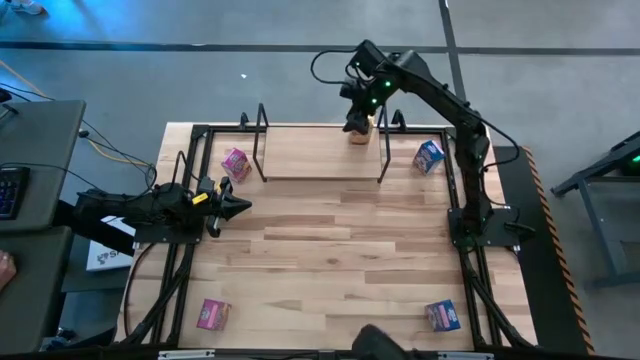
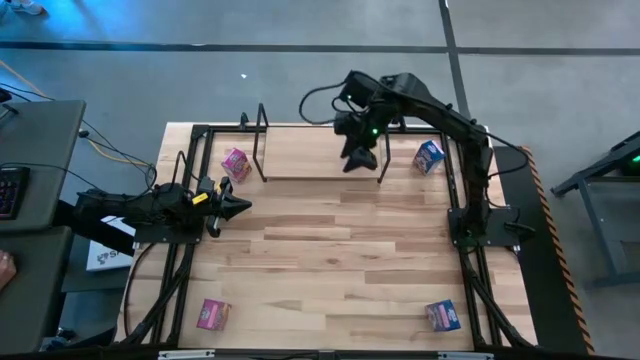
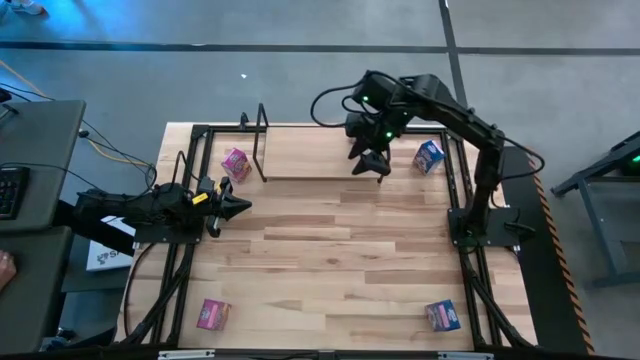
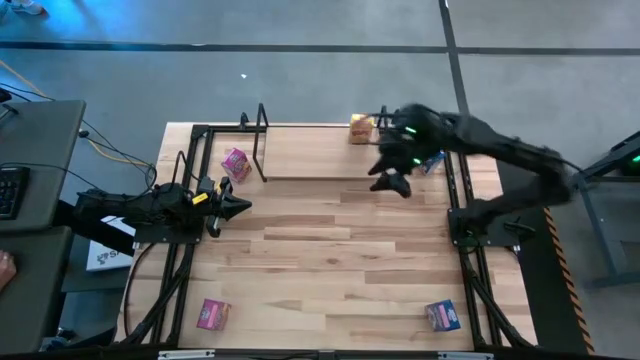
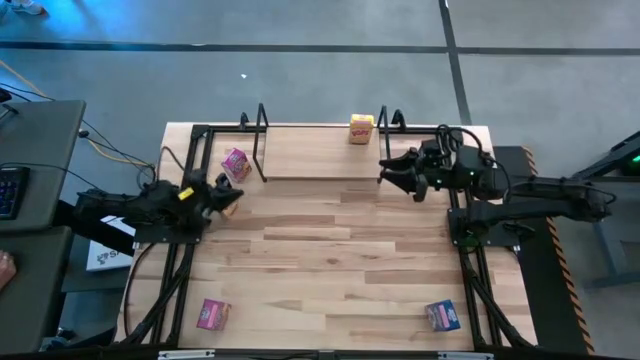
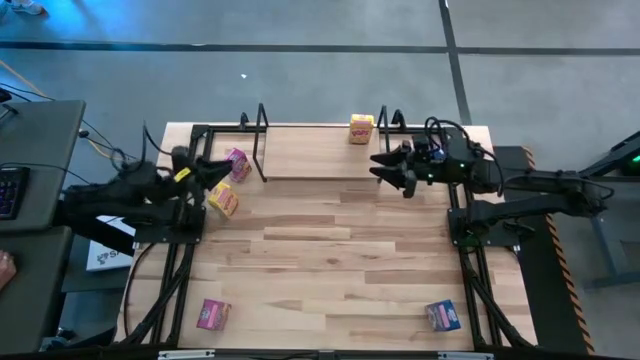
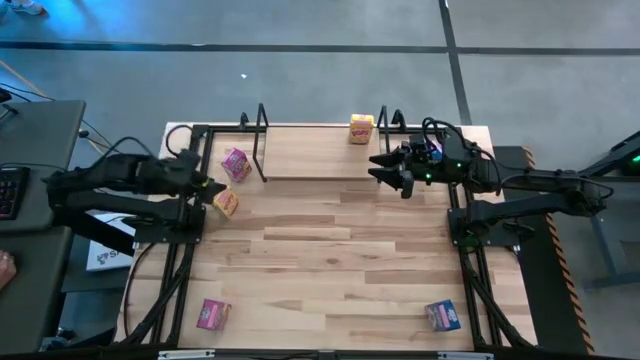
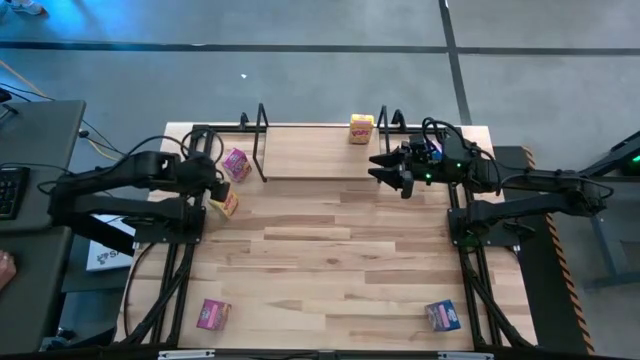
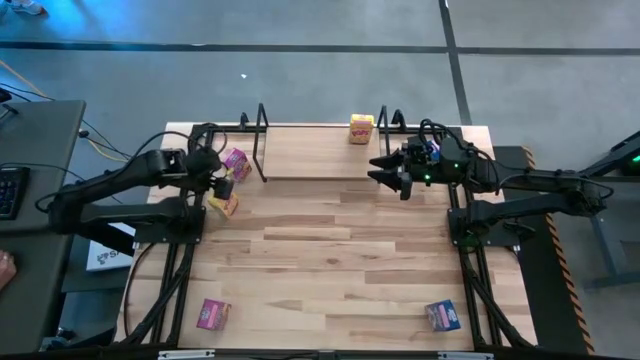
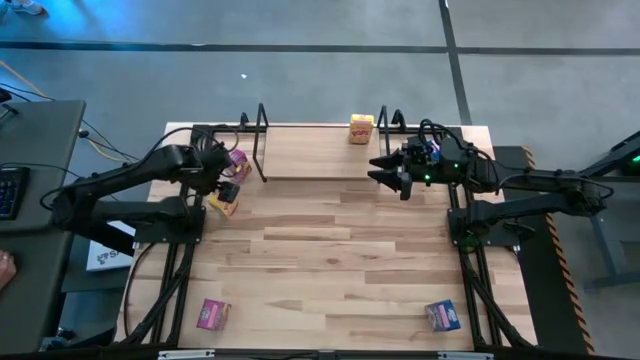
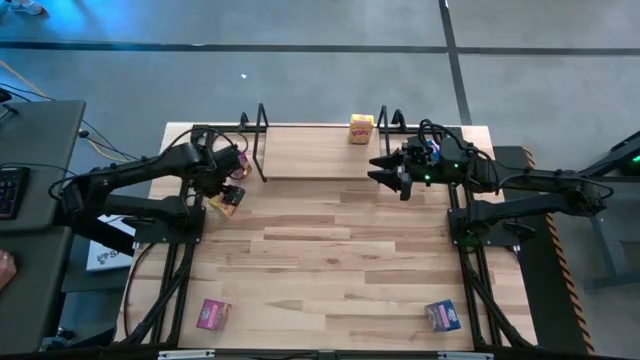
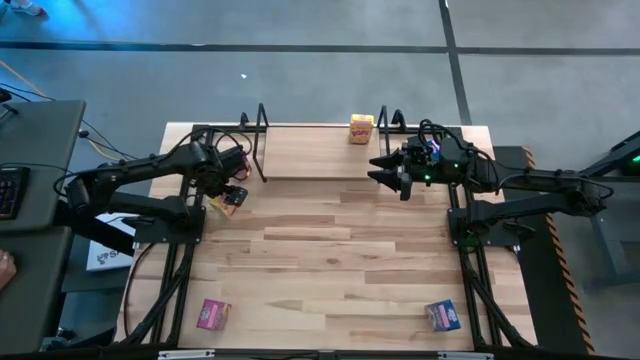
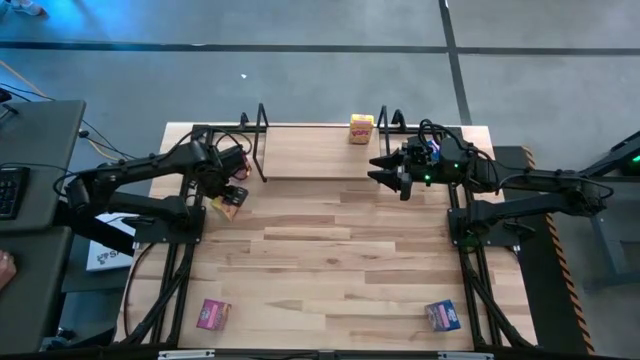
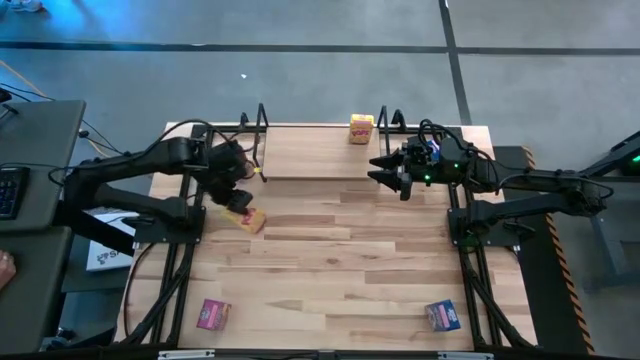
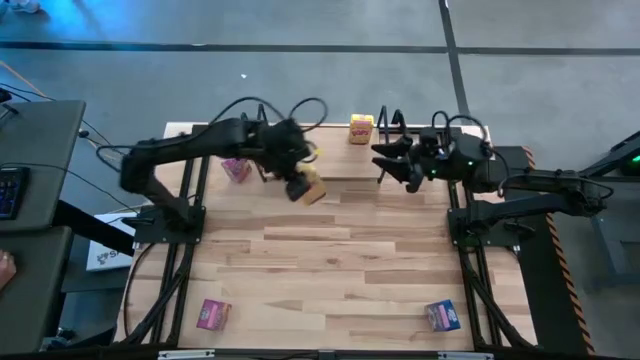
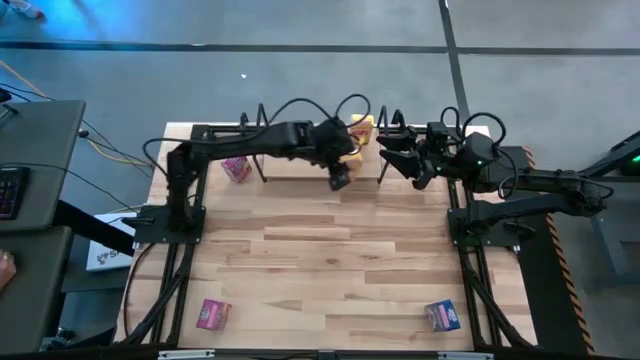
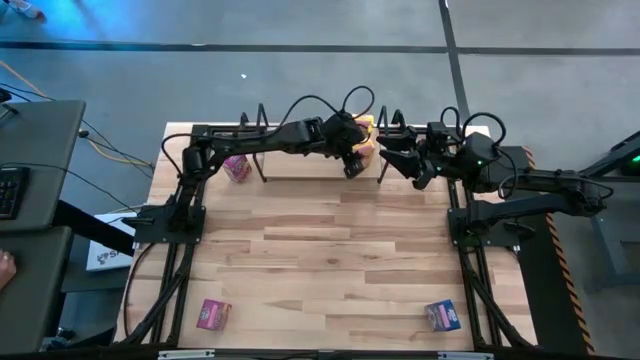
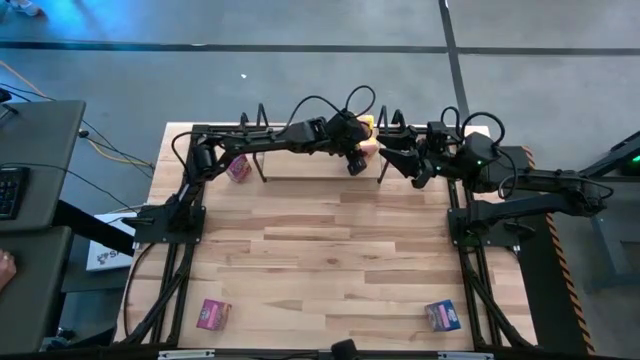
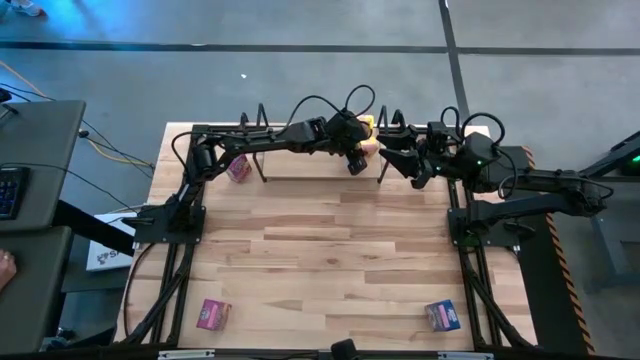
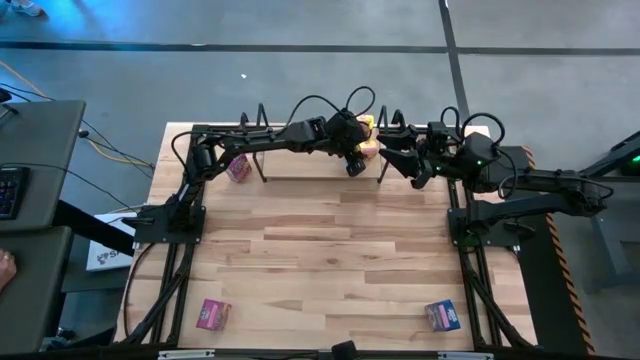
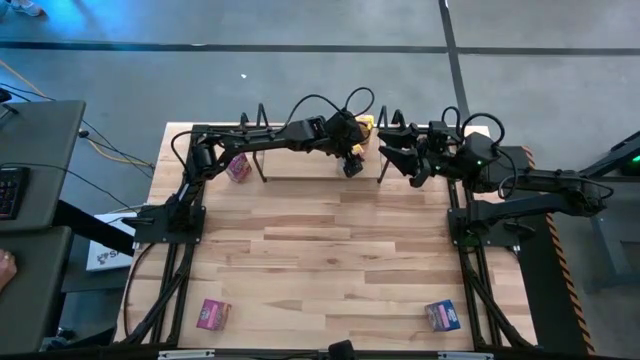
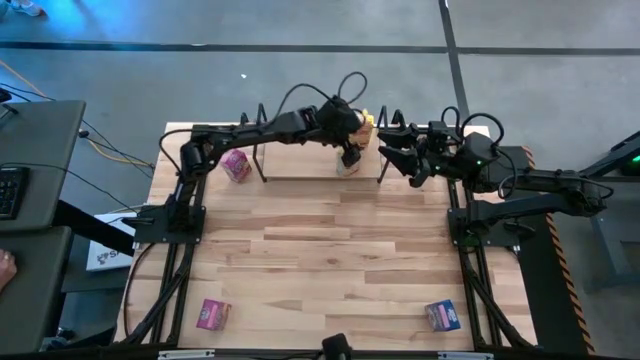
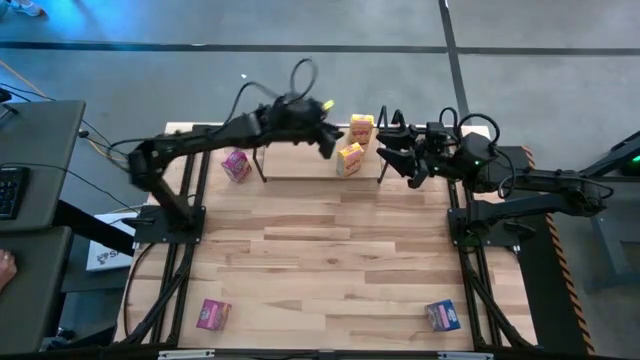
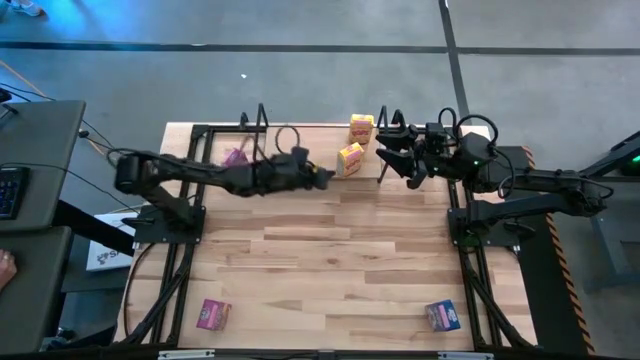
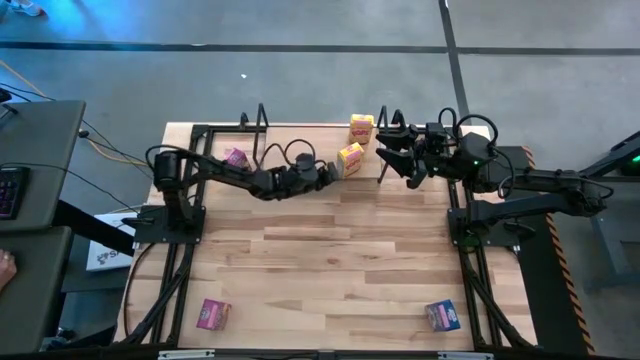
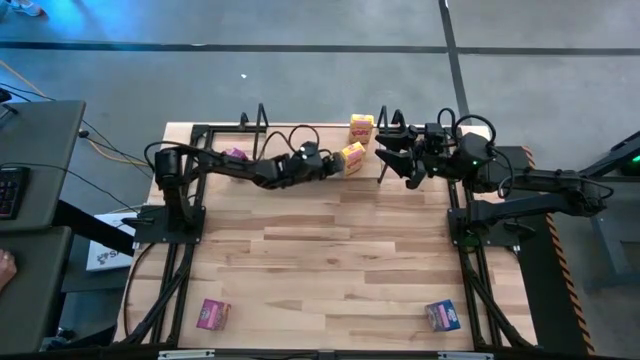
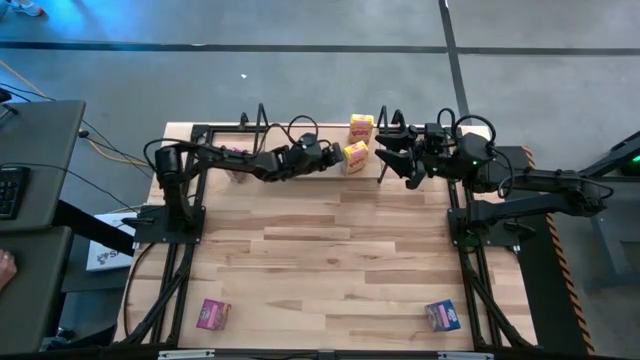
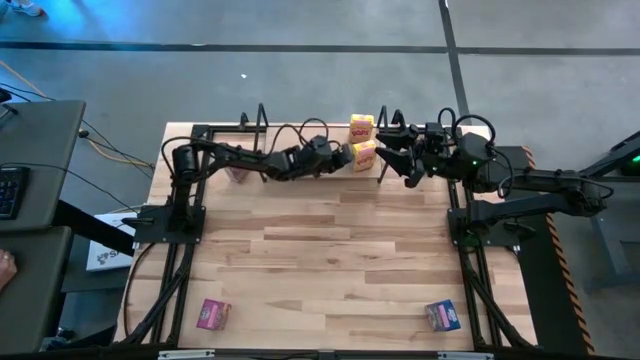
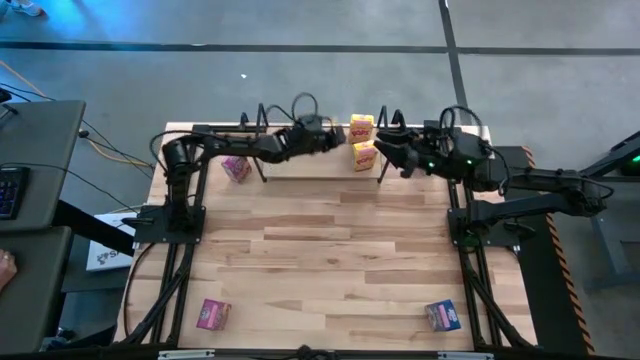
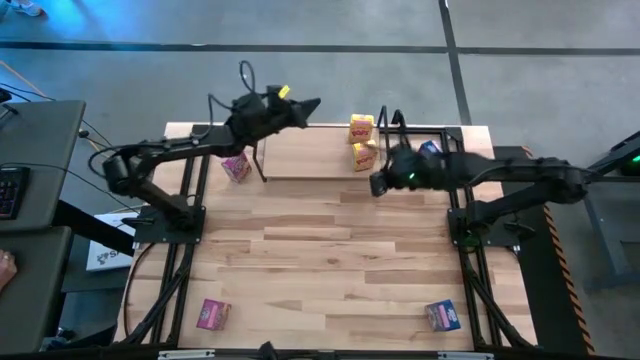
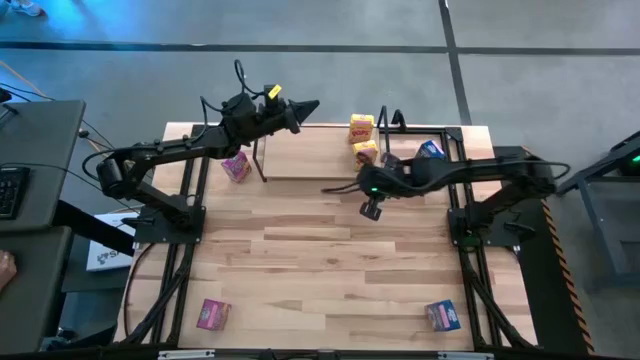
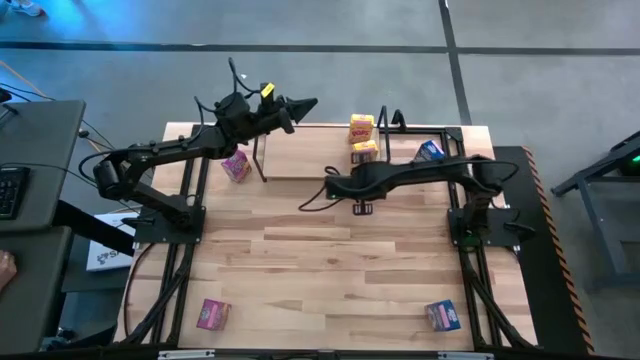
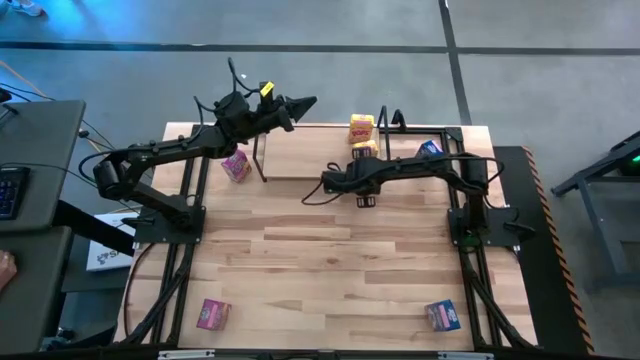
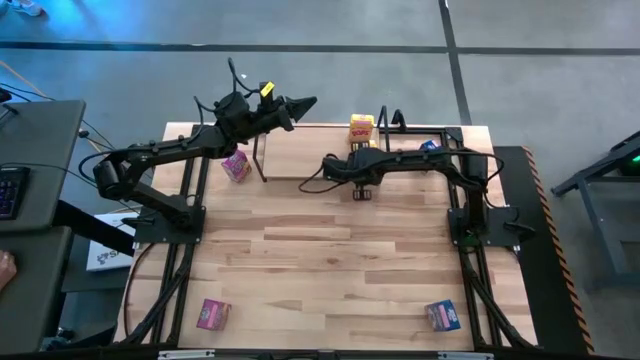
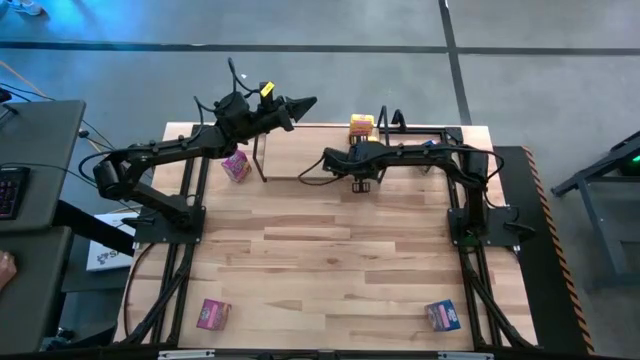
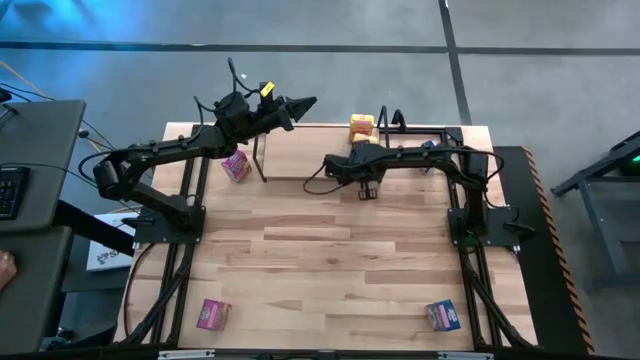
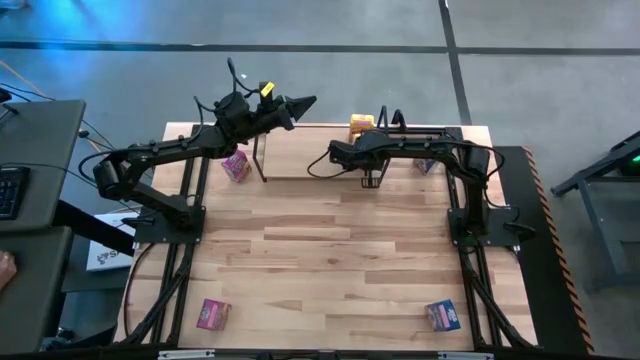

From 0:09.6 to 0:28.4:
Task: Stack cereal on shelf
Put the yellow cereal box on the shelf aligned with the other yellow cereal box
